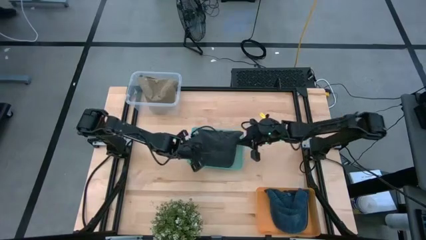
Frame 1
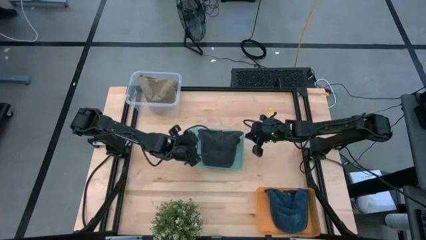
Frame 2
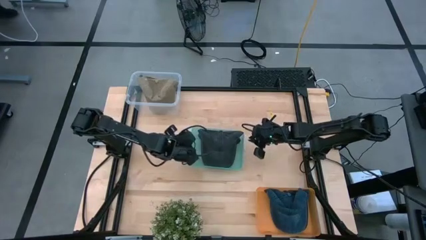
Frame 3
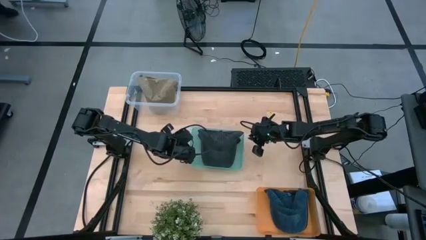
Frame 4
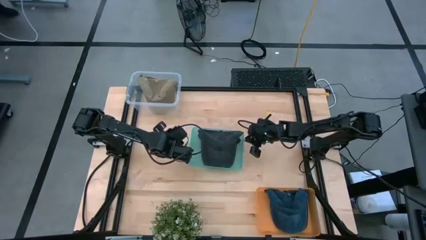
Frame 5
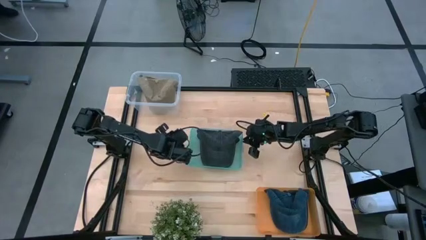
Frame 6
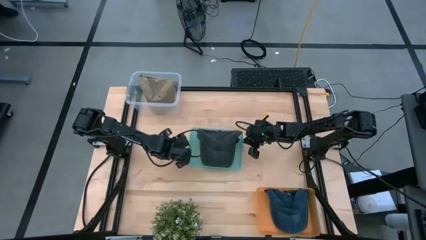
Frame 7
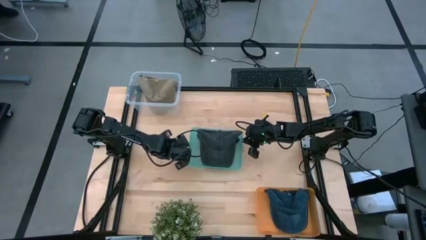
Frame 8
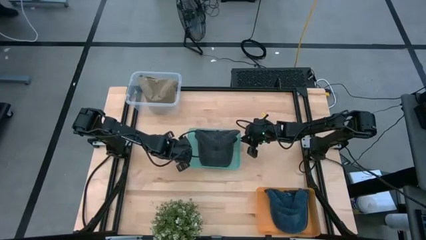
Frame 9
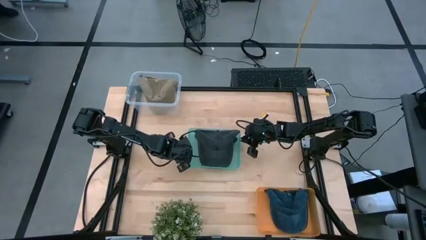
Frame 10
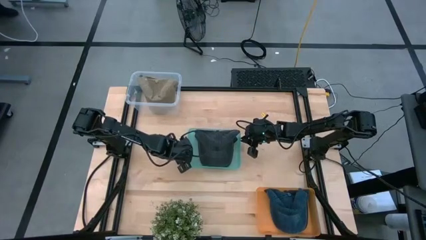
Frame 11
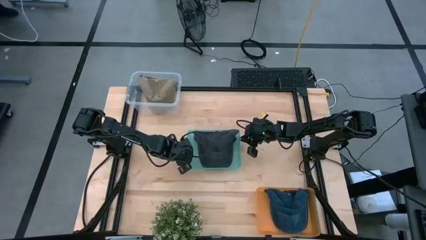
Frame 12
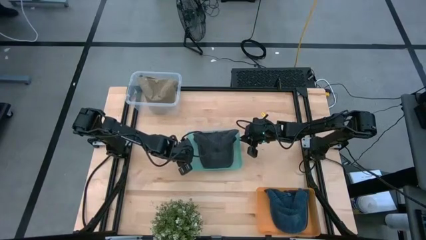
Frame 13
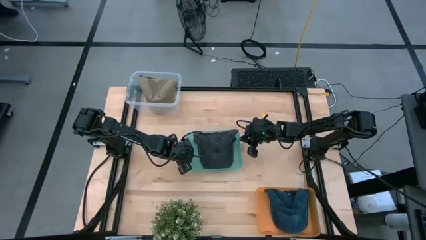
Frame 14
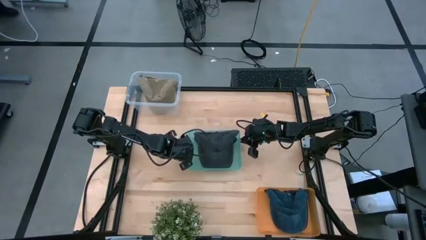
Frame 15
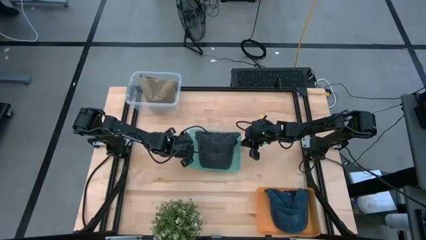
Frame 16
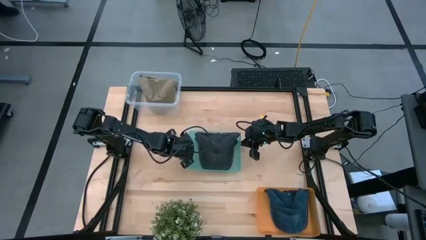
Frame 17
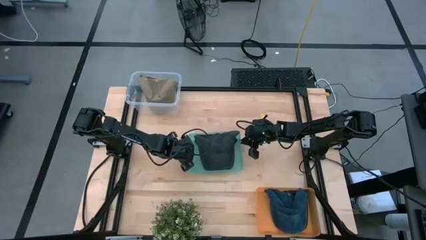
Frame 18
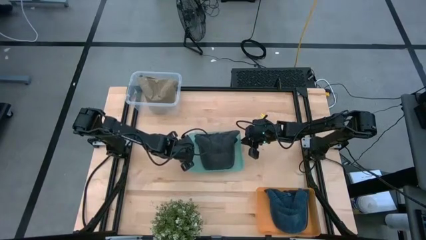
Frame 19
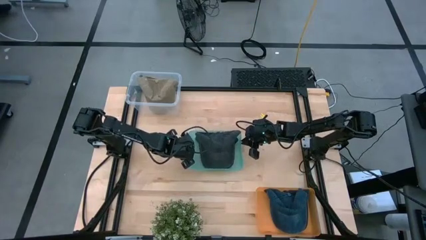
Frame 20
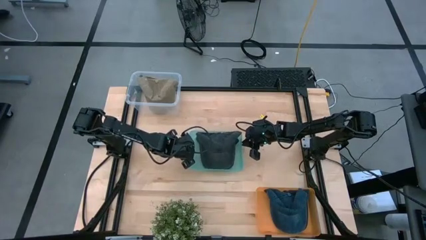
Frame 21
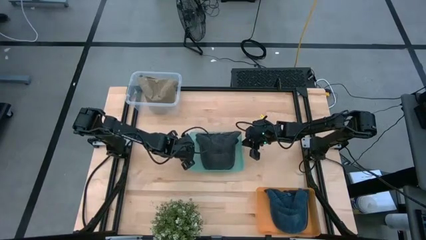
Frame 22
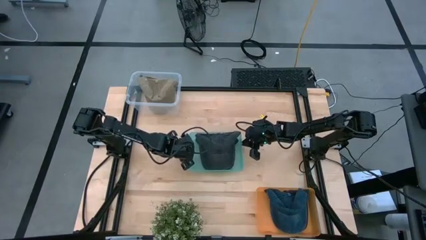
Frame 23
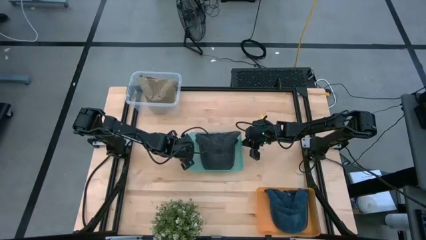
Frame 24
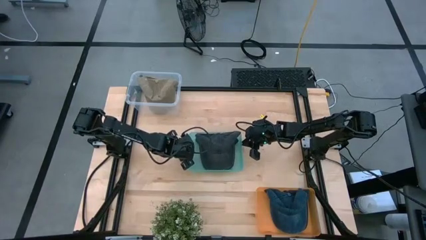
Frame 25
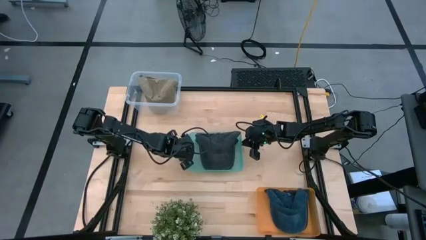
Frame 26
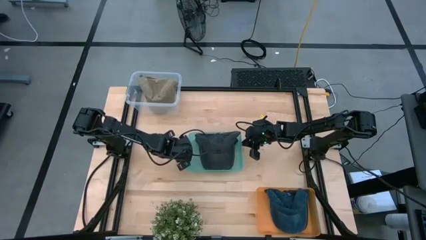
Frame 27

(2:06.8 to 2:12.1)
Task: Pick & Place hat
Adjust the green bin

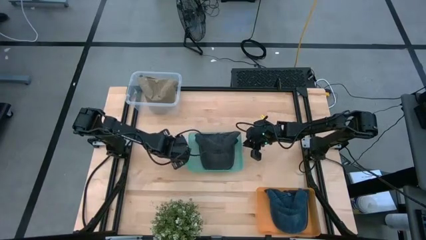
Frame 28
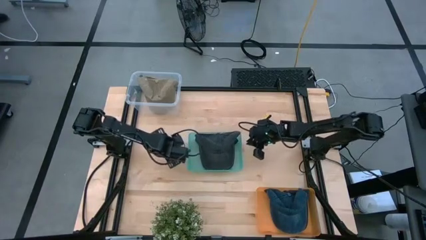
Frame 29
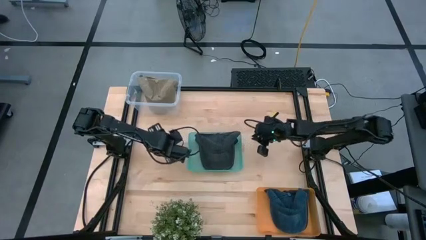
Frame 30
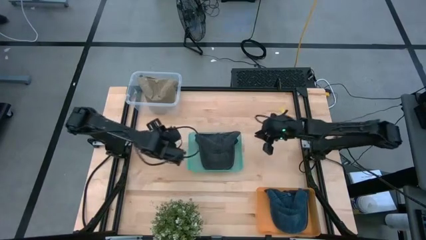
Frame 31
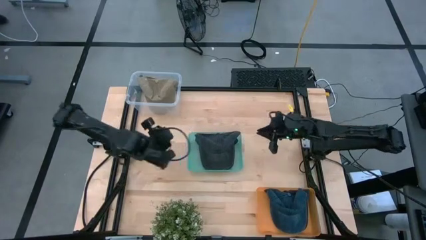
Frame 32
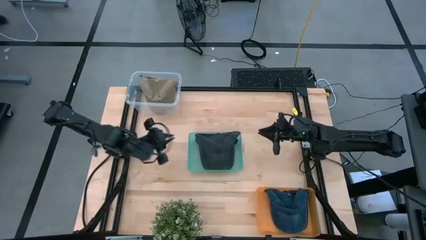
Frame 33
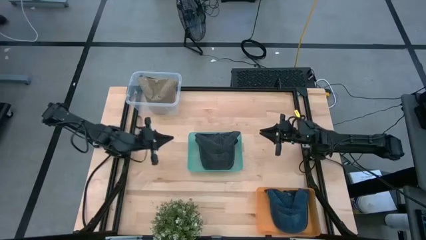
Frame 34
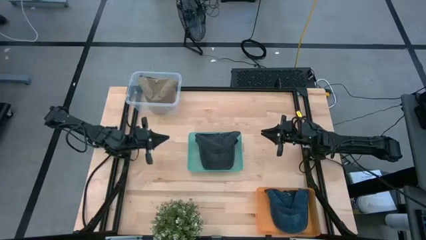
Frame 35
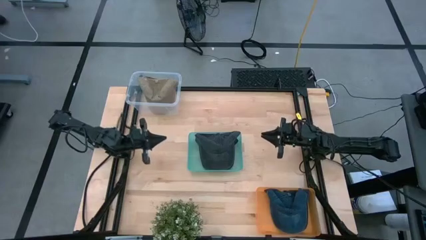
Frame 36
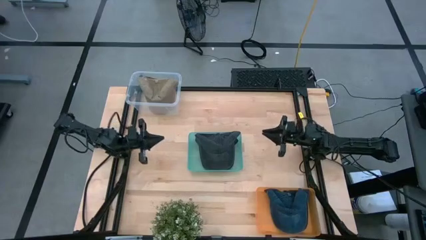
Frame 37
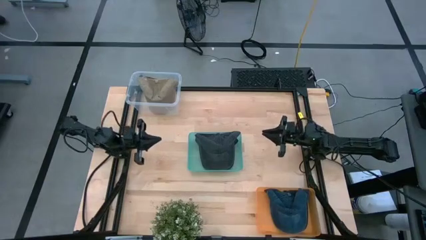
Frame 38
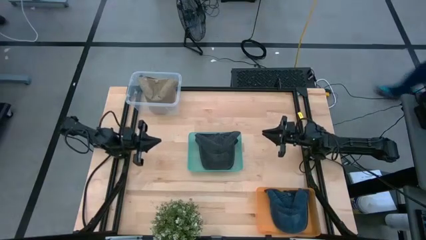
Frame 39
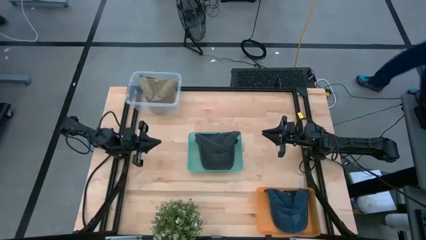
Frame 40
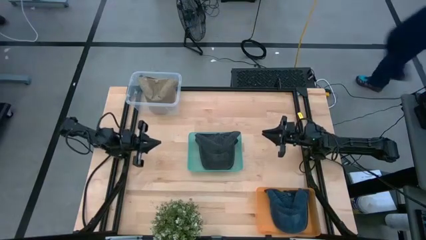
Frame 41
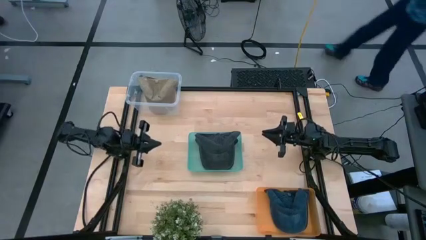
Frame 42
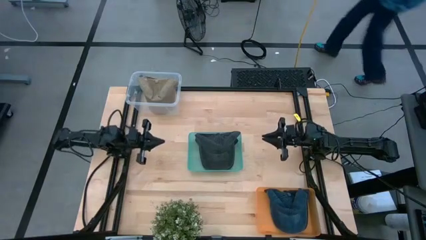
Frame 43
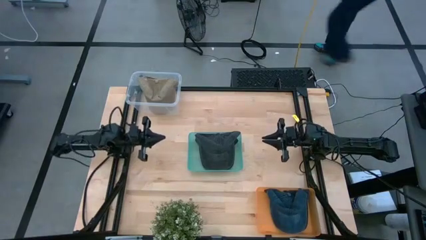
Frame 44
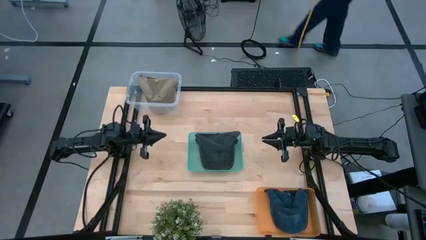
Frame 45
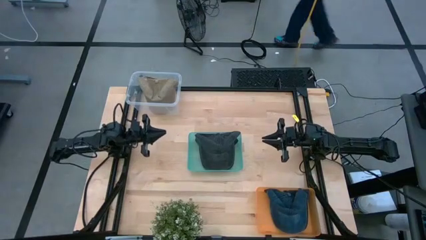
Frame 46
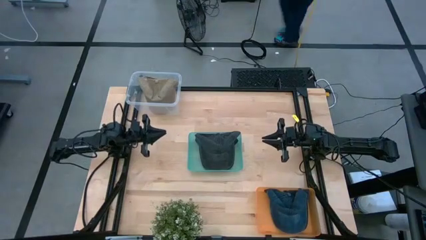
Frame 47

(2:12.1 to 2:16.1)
Return to Home Position

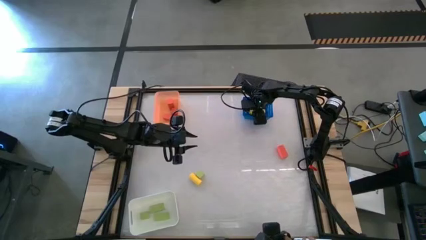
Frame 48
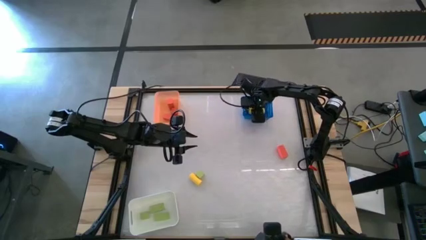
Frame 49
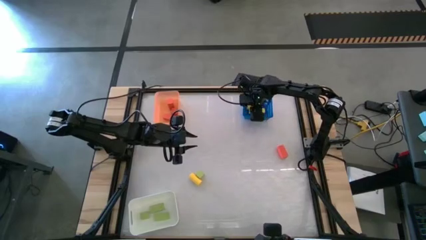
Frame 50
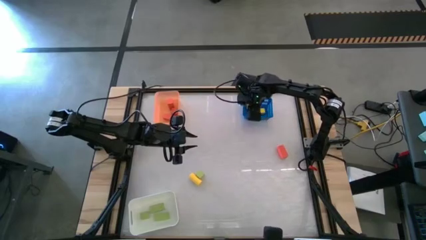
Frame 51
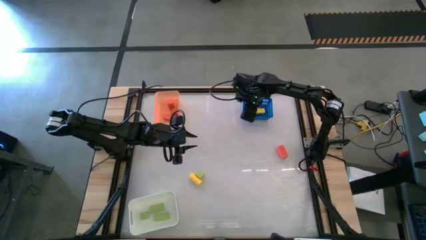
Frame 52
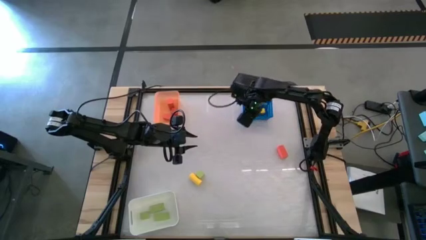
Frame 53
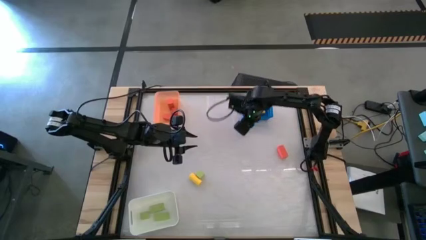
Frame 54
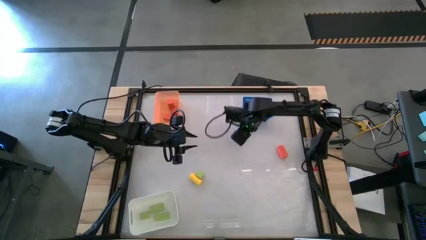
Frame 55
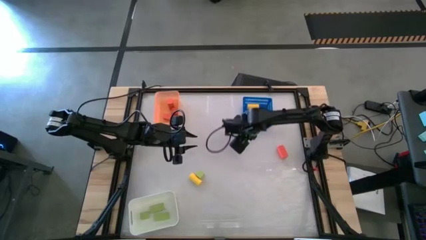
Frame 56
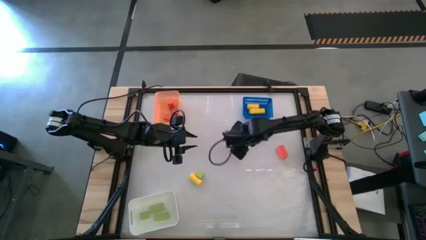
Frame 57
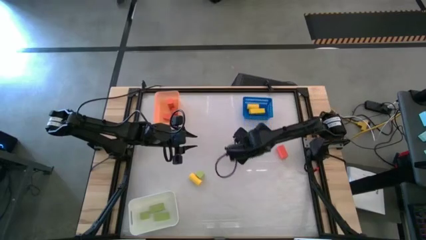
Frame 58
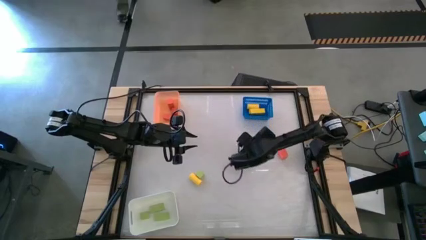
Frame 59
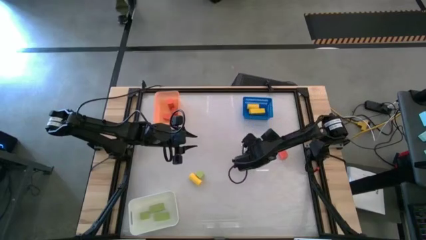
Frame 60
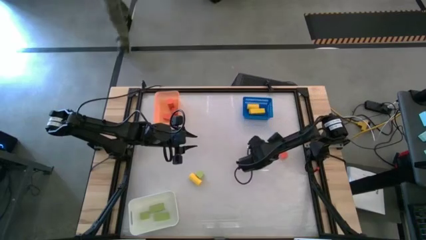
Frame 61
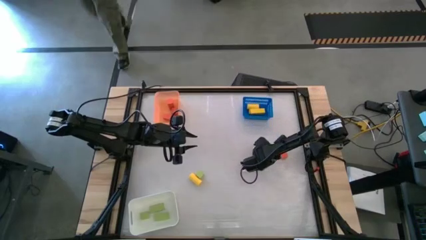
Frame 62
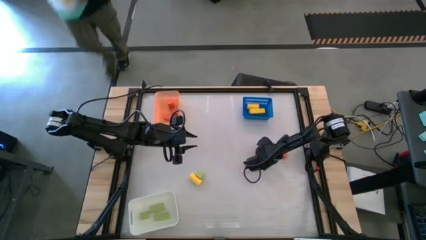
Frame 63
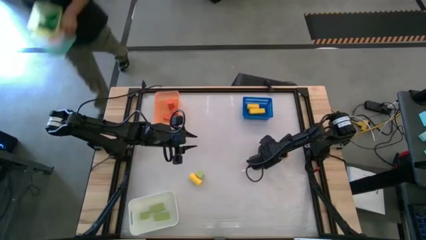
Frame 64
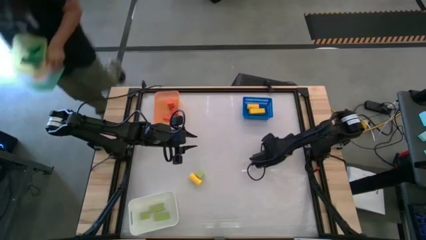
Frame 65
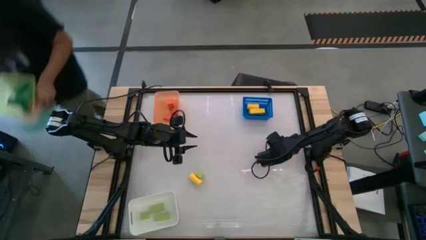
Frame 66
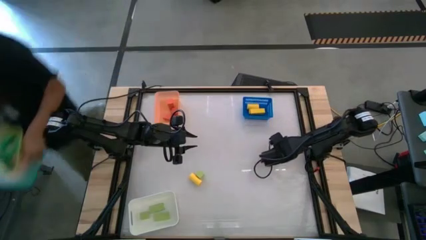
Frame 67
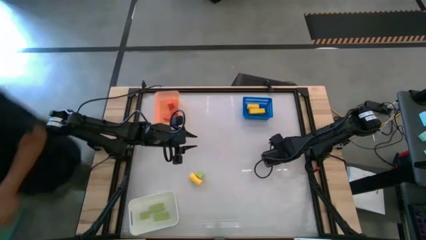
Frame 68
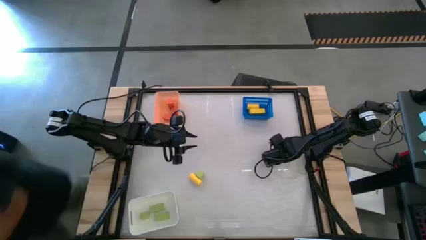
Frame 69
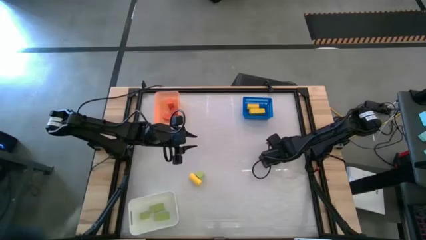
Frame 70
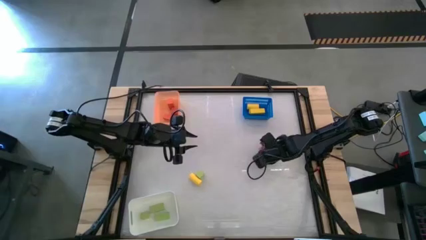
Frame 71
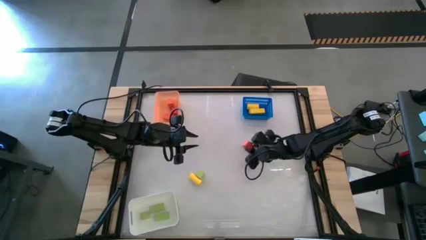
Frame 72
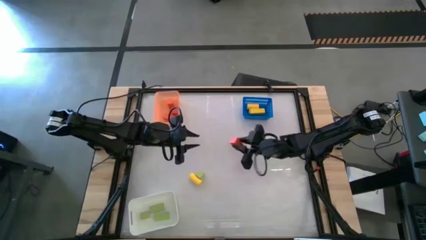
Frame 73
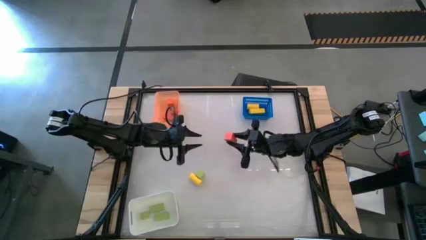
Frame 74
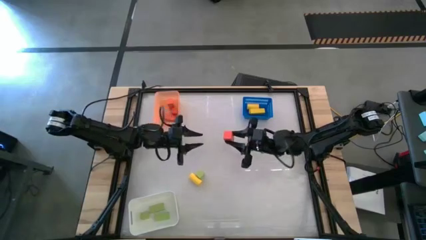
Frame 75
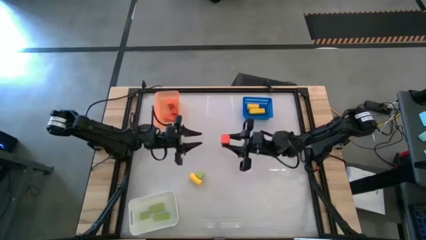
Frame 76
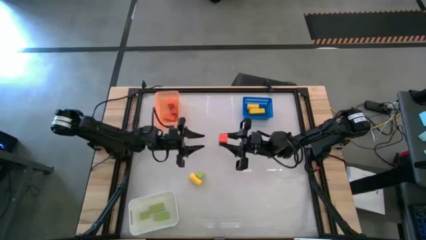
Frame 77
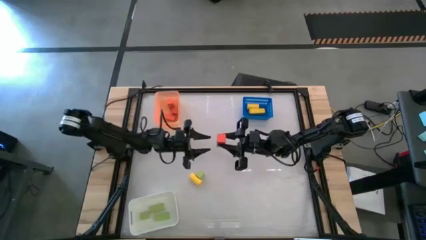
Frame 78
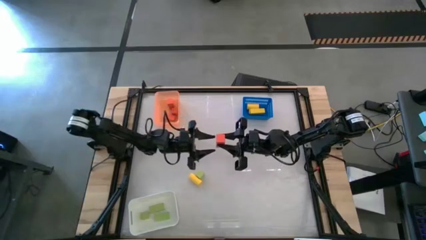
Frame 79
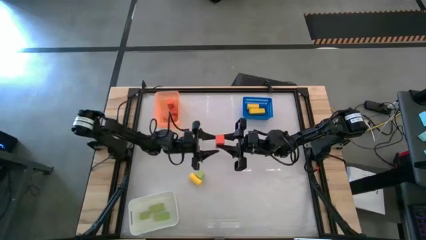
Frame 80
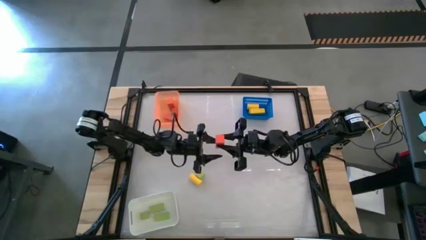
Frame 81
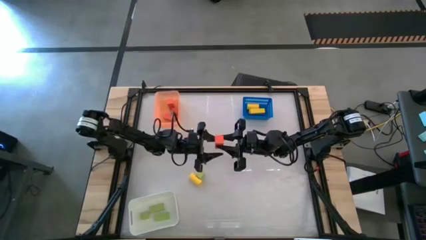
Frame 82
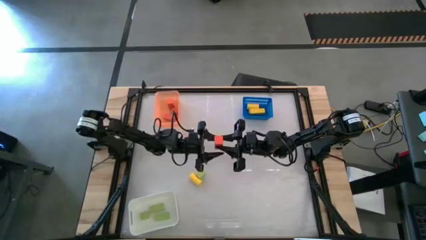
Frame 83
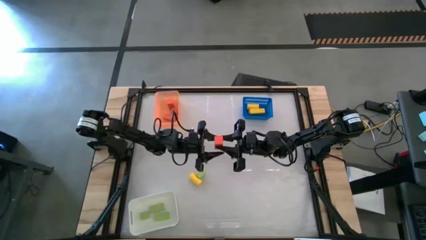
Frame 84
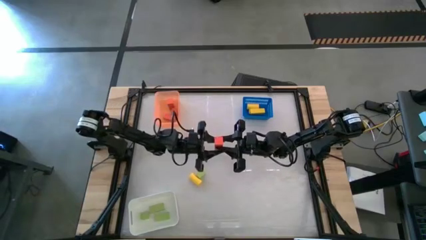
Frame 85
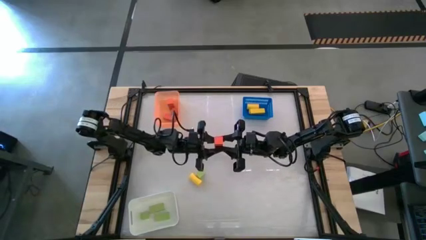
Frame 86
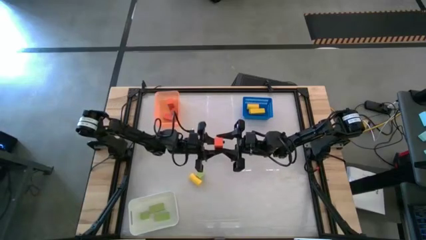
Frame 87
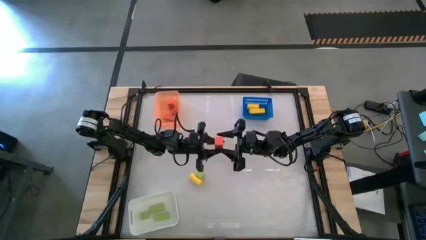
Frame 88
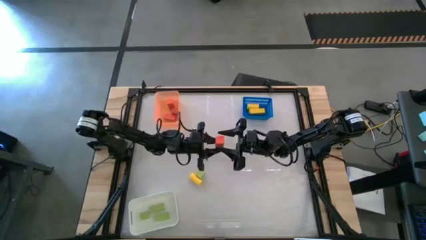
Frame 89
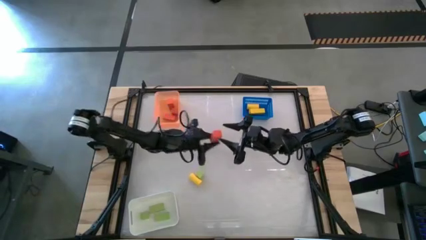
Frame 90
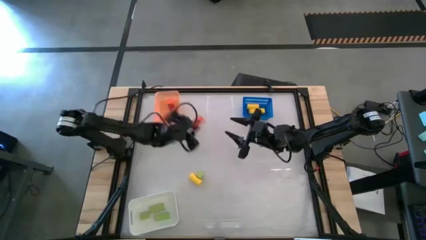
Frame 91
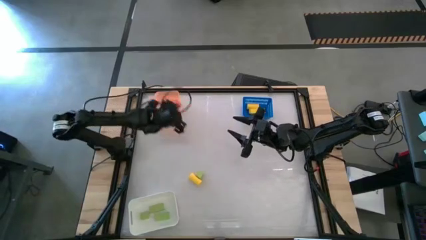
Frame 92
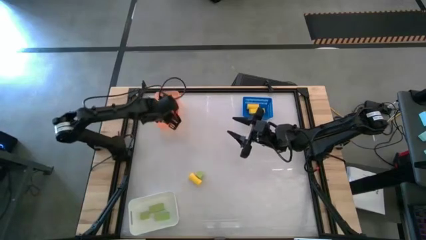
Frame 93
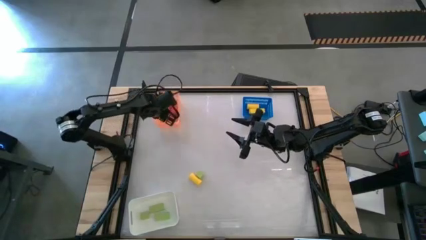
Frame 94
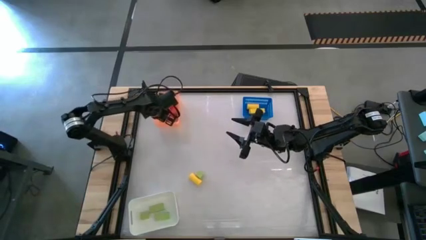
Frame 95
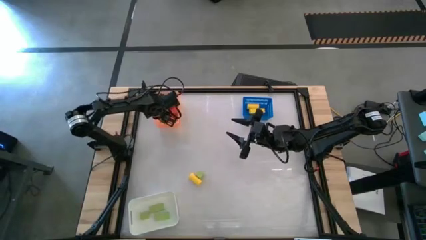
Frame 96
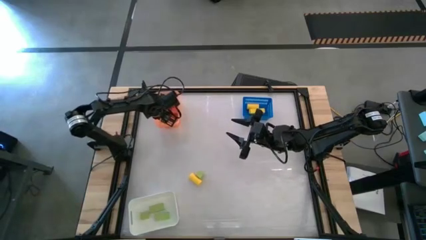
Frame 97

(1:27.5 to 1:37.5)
Task: Sort & place blocks by color
Put the orange wooden block into the orange bin
